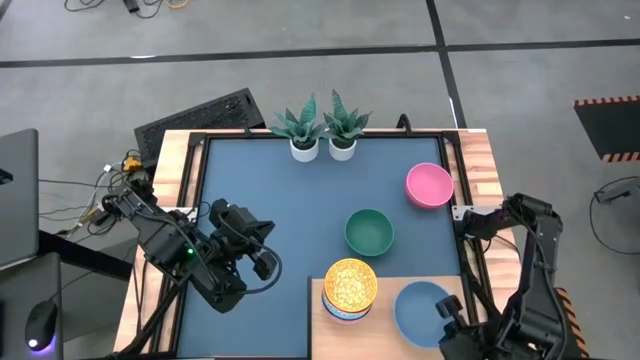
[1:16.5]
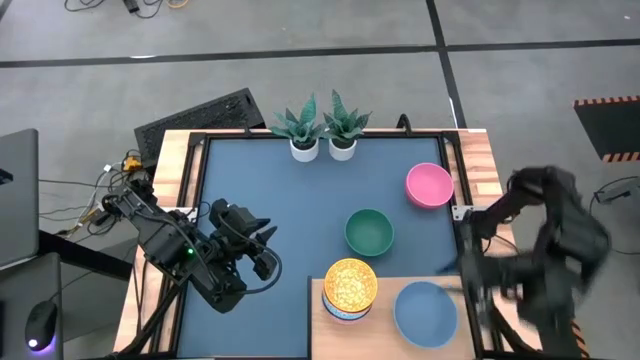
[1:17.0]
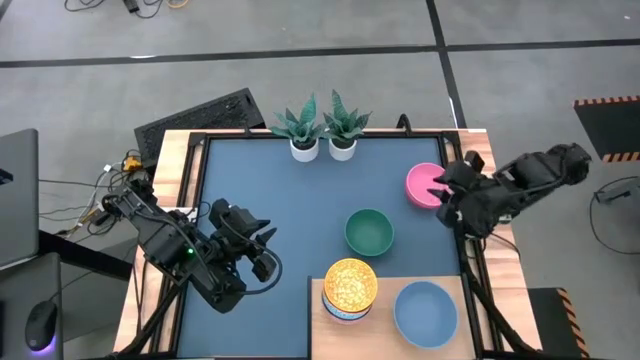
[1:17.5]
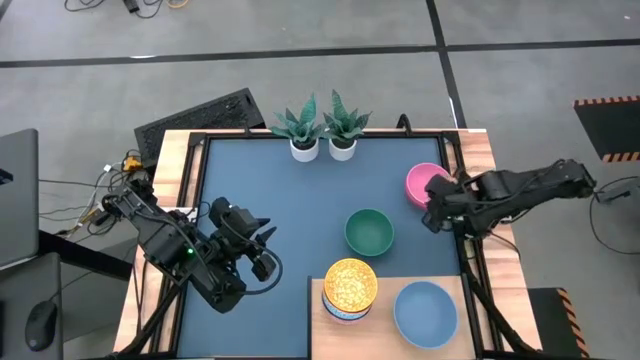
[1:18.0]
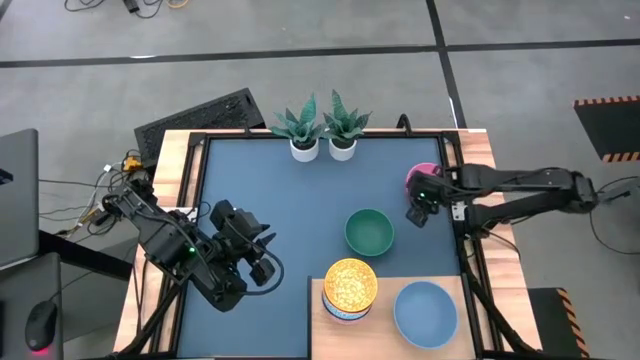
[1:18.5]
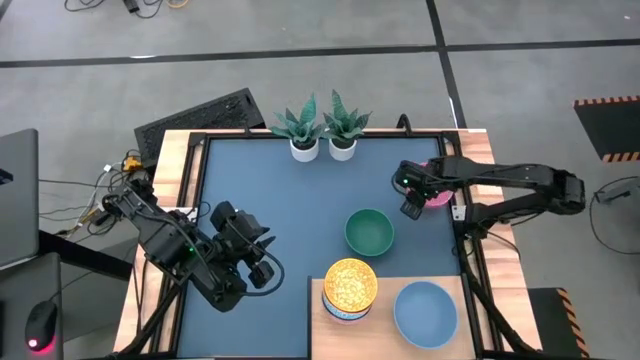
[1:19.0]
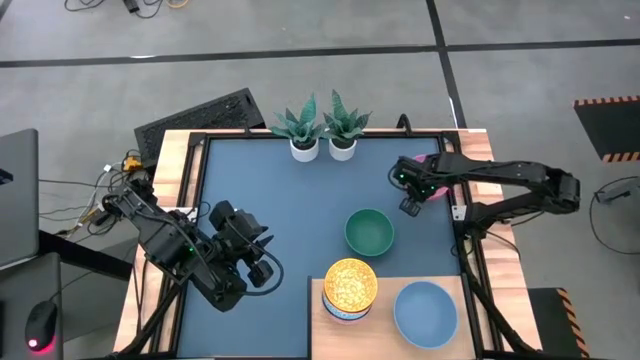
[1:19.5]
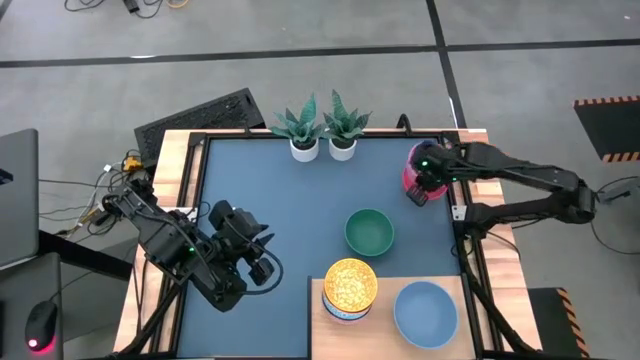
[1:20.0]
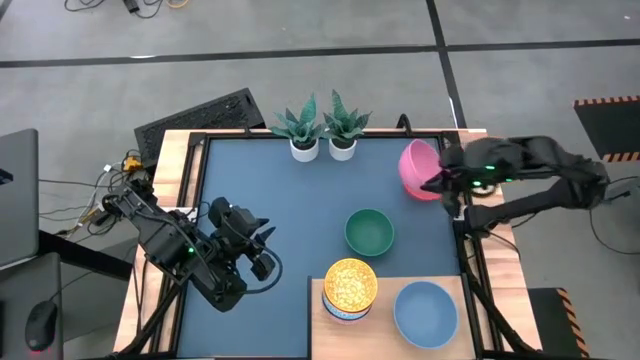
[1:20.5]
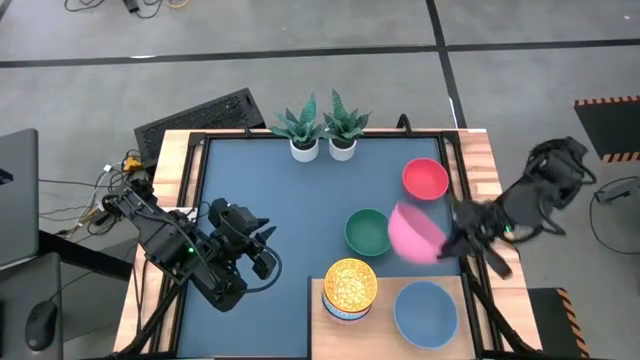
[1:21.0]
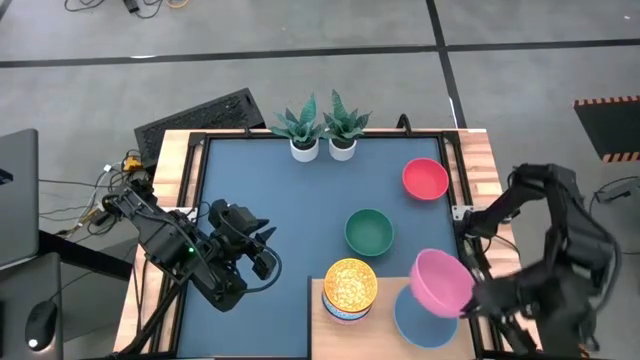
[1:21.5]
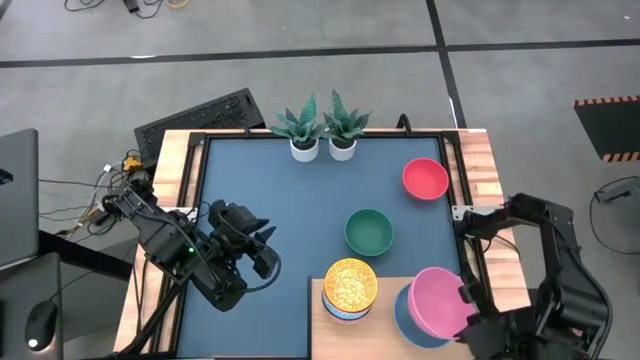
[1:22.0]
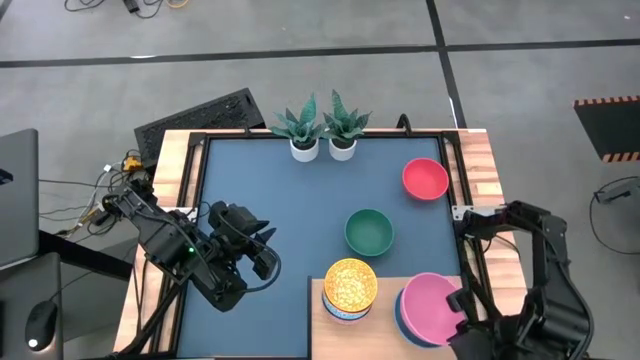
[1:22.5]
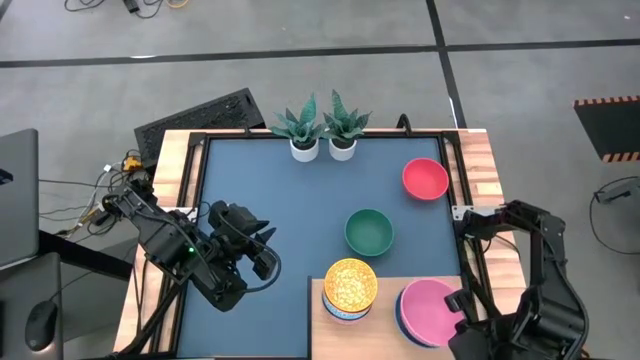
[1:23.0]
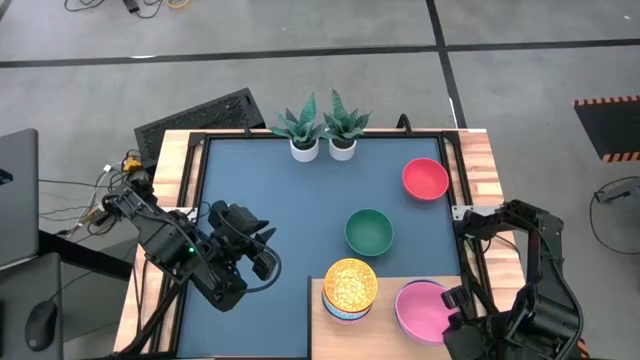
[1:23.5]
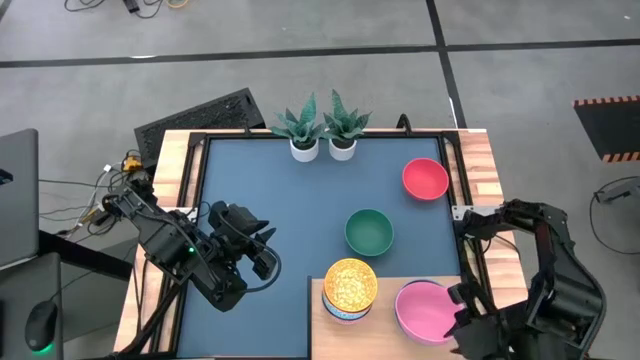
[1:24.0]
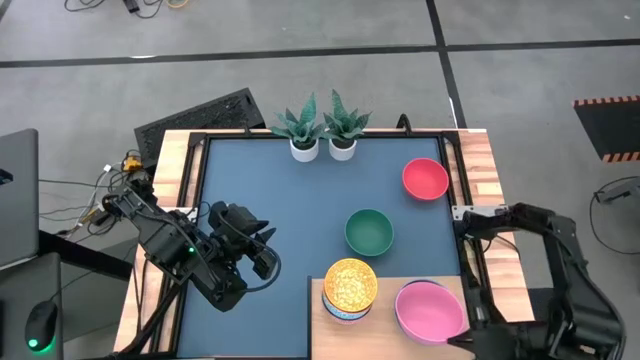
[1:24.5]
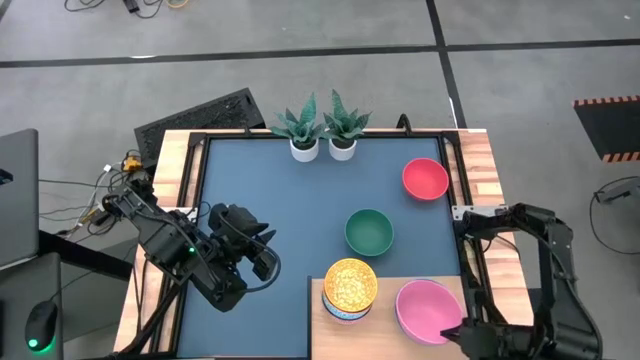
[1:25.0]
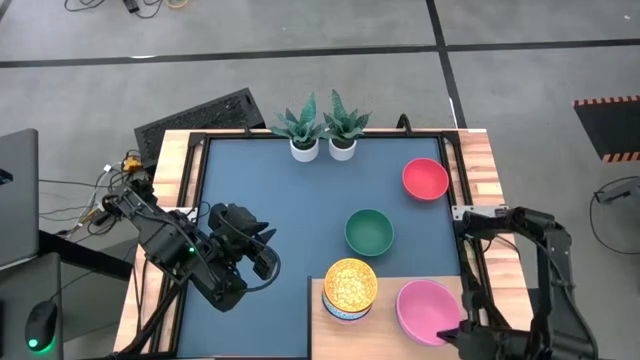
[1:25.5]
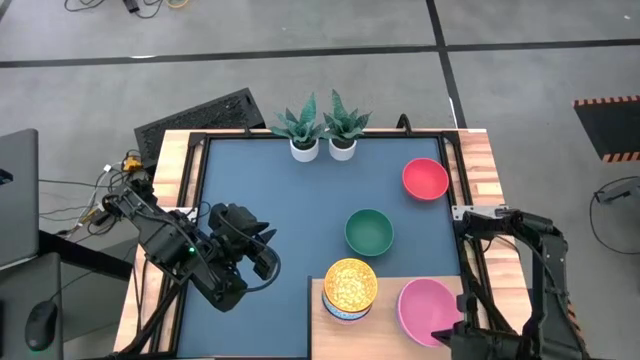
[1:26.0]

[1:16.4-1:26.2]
Task: Place and stack bowls onto a shelf
Stack the pink bowl on top of the blue bowl on the shelf

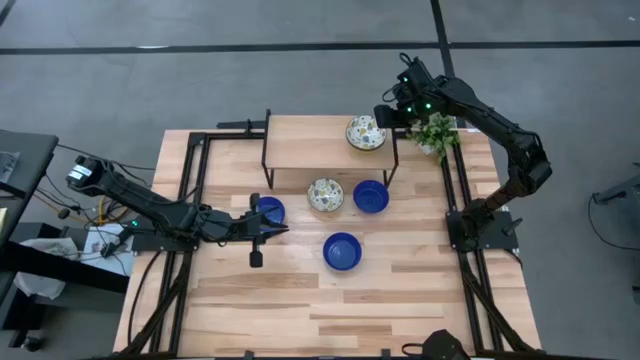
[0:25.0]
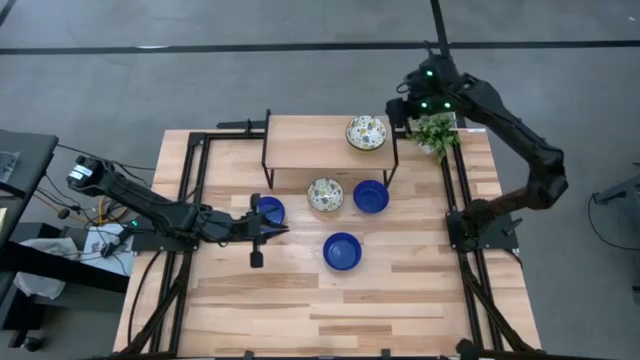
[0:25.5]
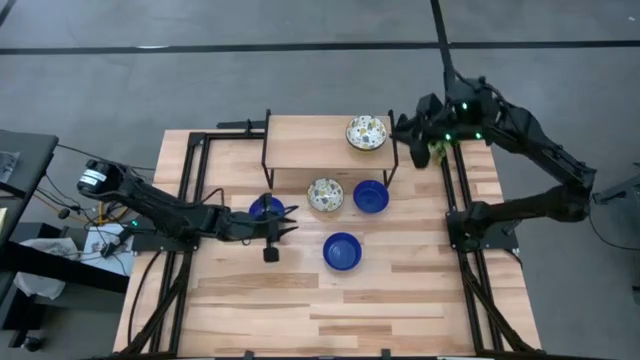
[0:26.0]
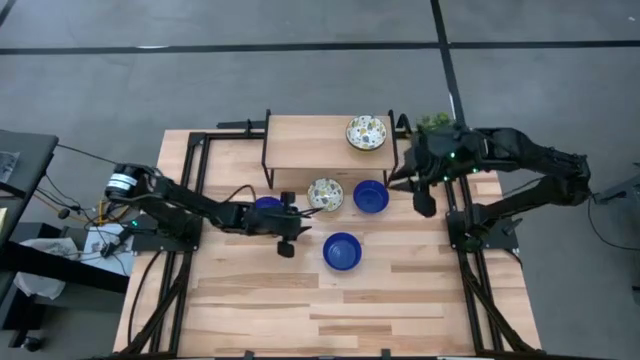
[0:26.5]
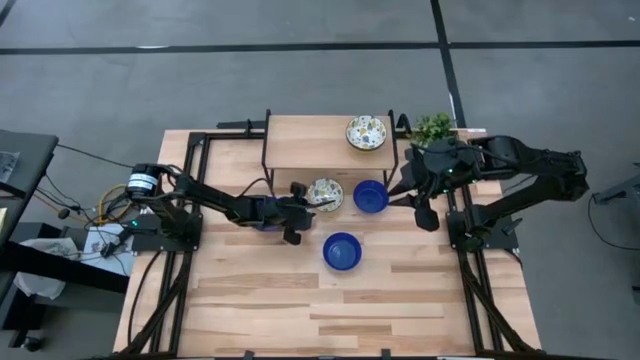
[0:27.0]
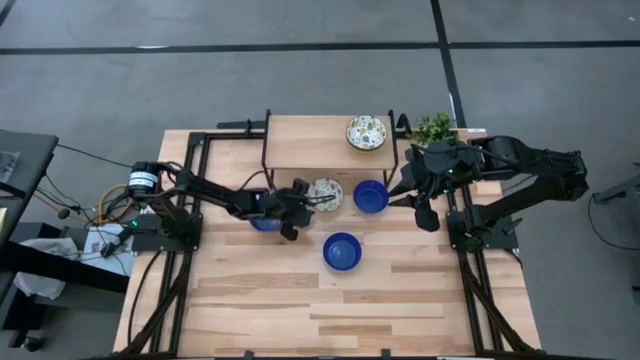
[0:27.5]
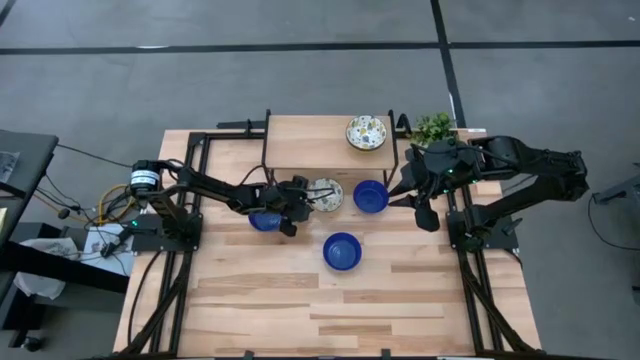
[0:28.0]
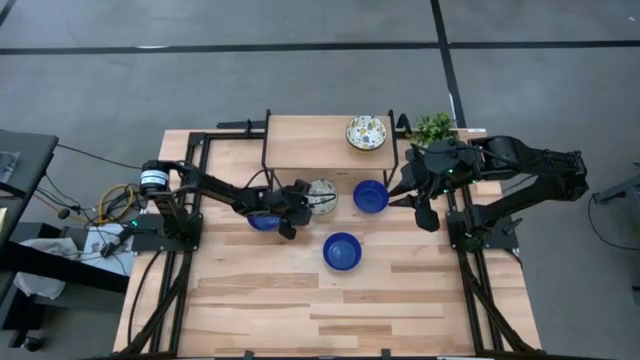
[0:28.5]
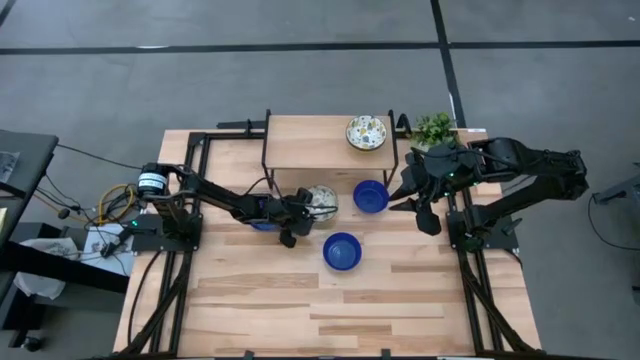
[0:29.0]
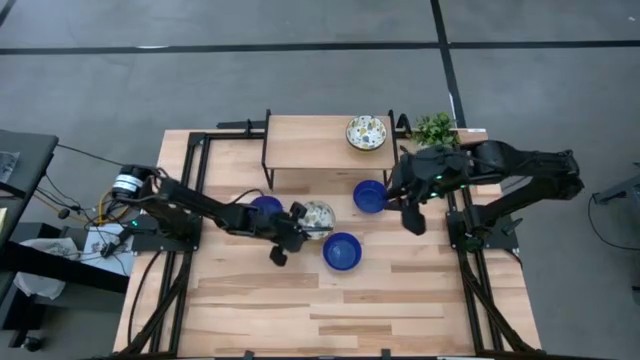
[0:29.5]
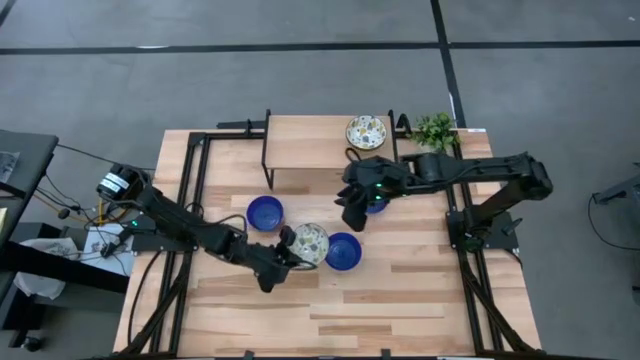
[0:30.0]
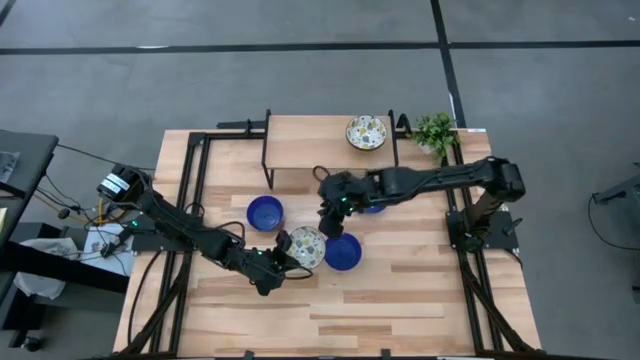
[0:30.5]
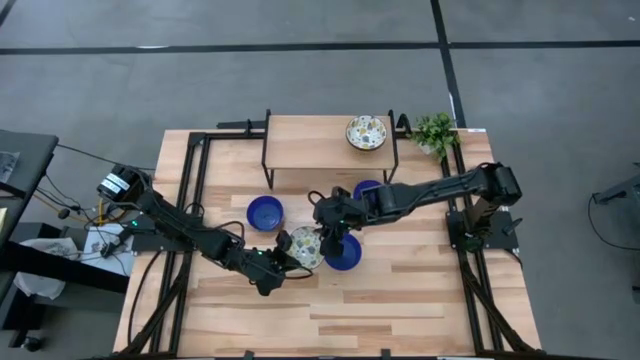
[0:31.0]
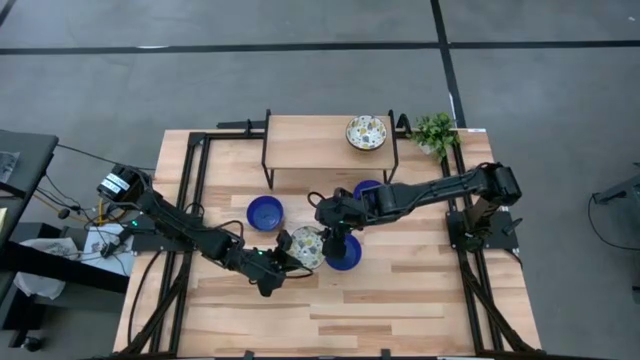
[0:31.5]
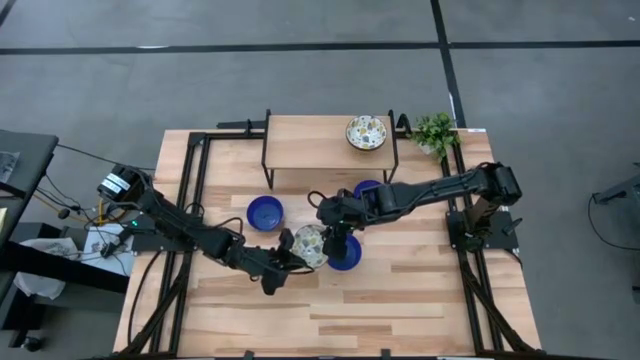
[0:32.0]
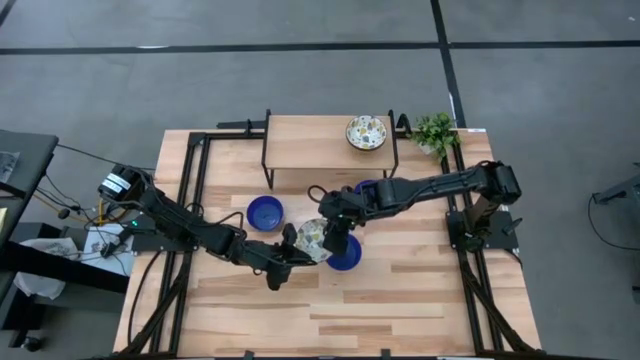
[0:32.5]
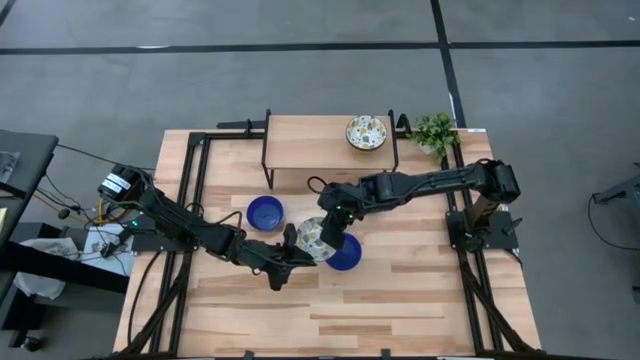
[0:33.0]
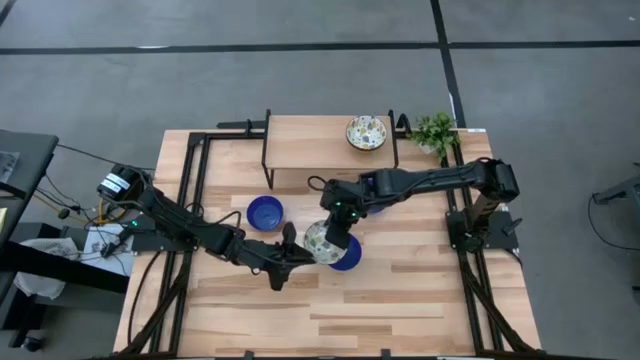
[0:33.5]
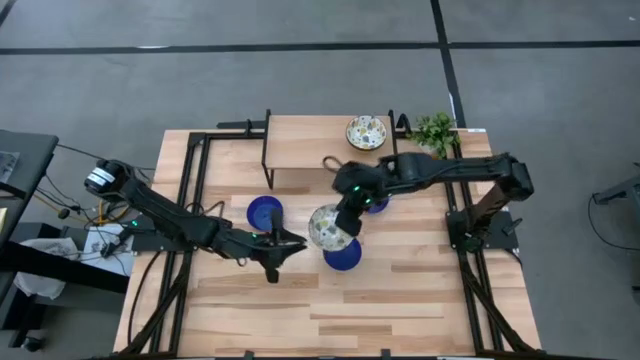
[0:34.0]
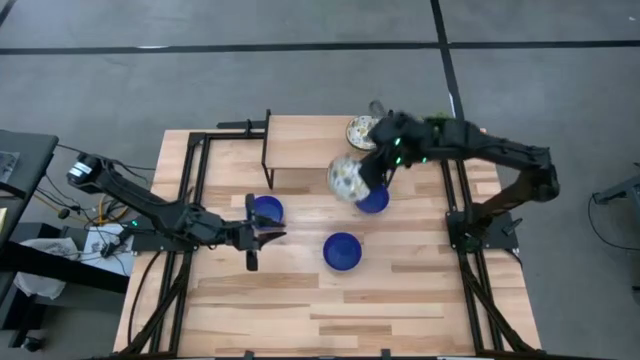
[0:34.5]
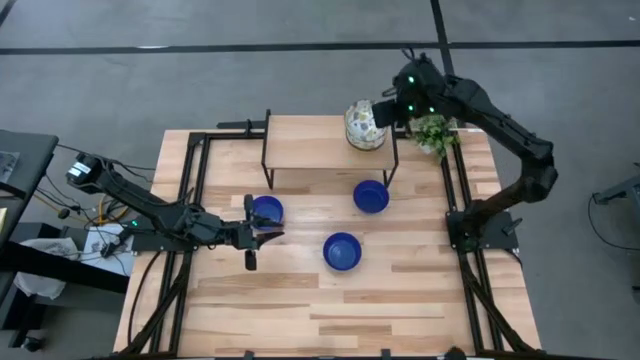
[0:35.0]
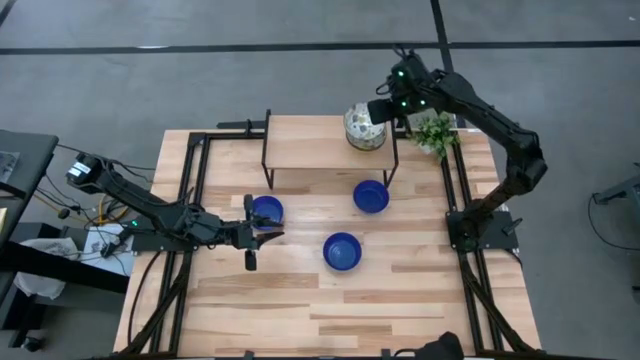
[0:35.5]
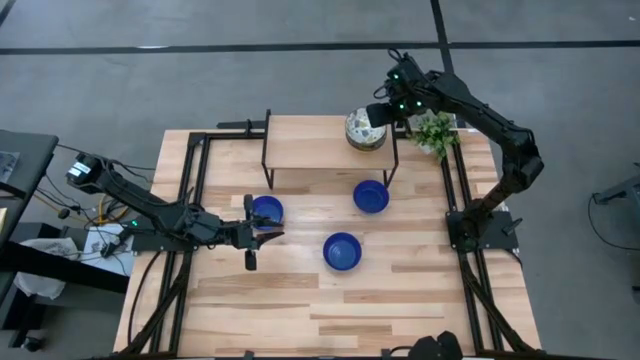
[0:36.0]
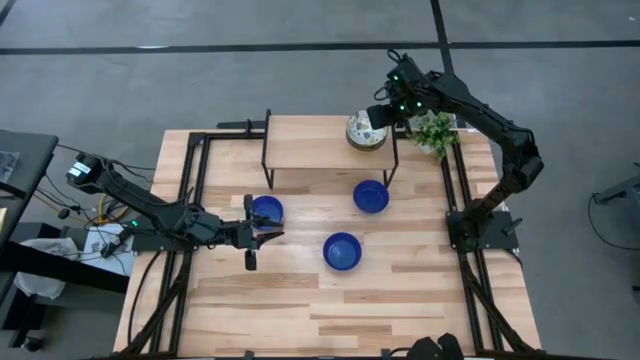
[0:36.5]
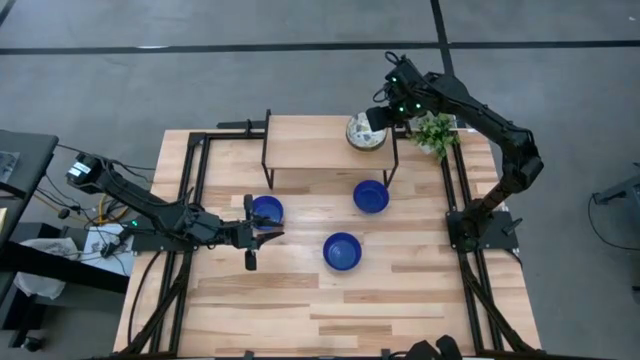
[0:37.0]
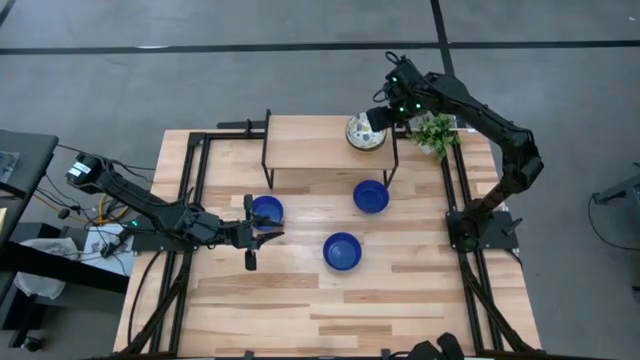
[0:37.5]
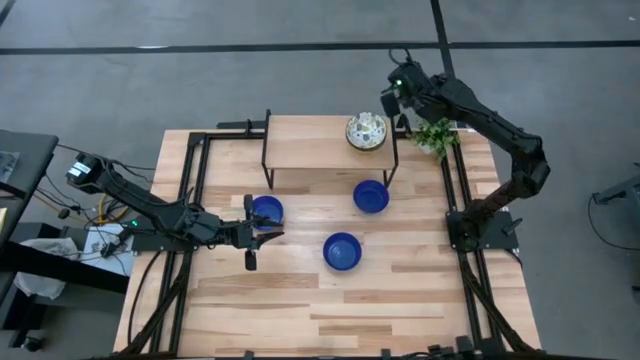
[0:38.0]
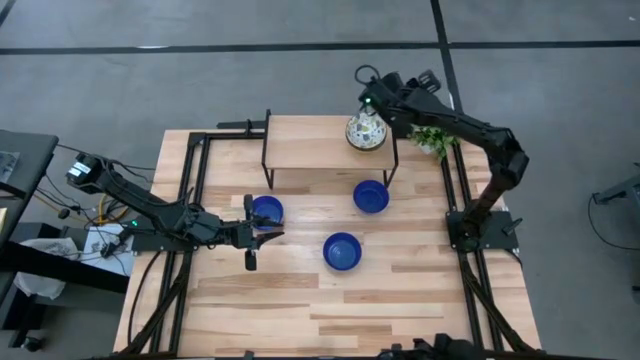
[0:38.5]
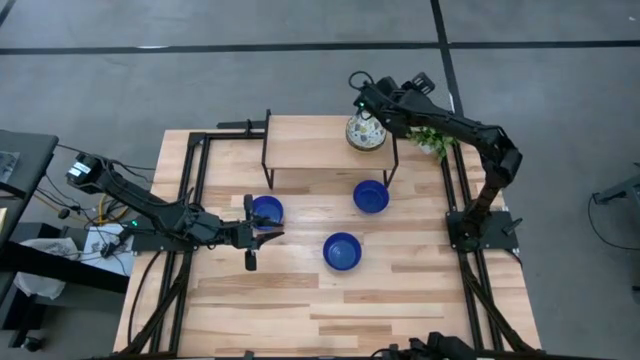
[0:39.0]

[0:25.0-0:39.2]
Task: Pick & Place Mini bowls
Stack the yellow patterned bowl on top of the yellow patterned bowls on the shelf
